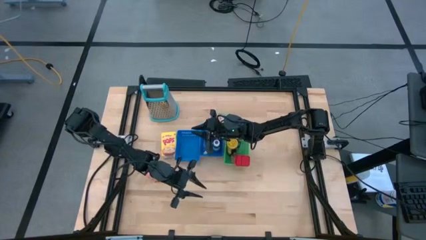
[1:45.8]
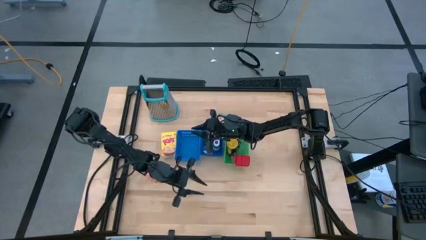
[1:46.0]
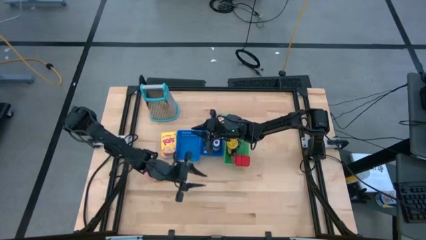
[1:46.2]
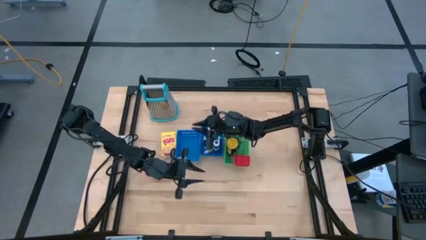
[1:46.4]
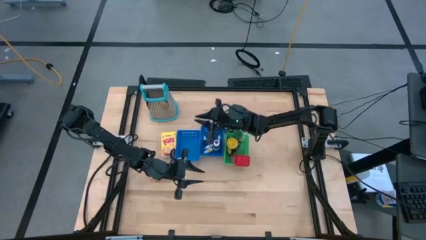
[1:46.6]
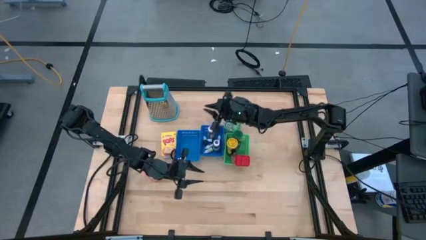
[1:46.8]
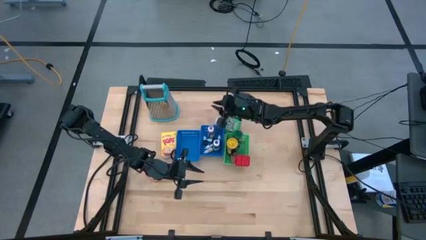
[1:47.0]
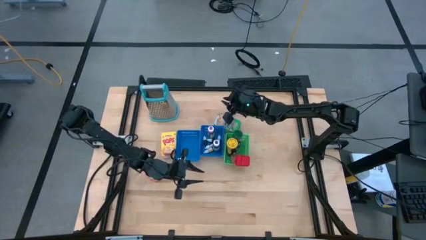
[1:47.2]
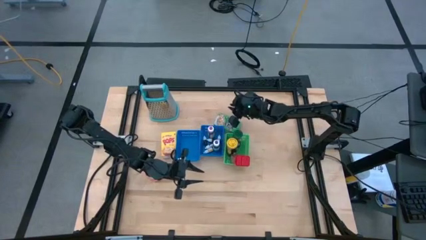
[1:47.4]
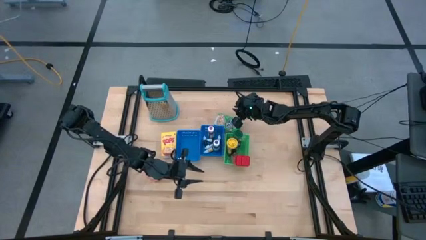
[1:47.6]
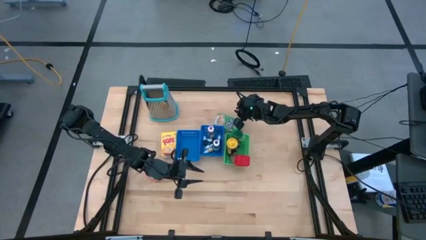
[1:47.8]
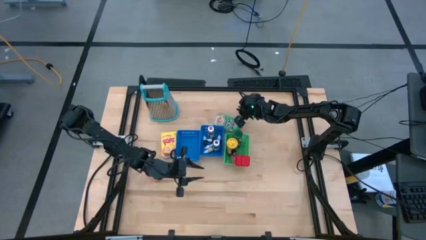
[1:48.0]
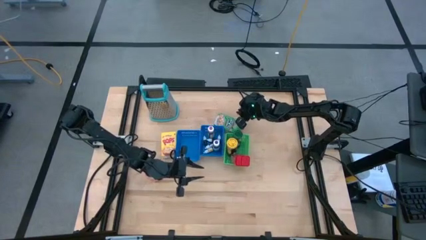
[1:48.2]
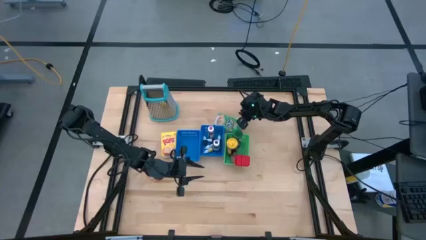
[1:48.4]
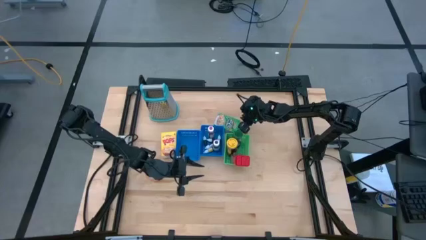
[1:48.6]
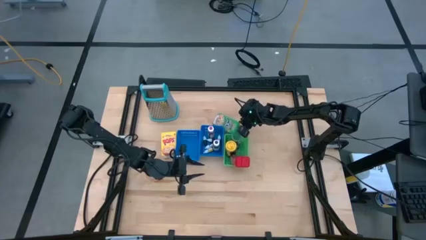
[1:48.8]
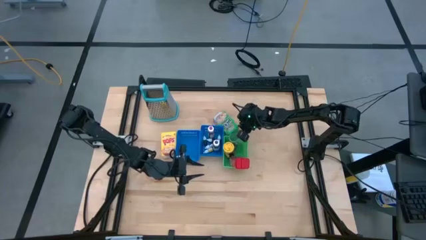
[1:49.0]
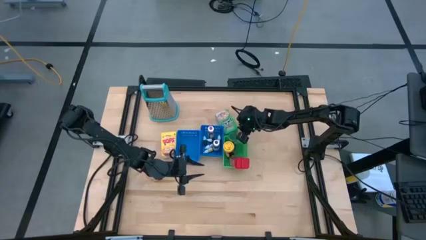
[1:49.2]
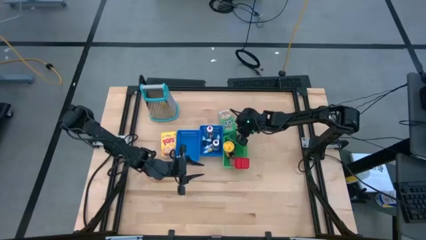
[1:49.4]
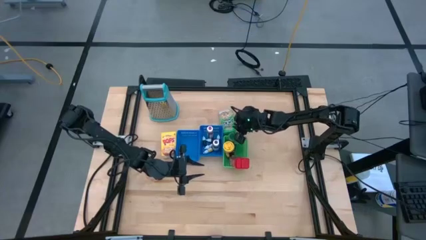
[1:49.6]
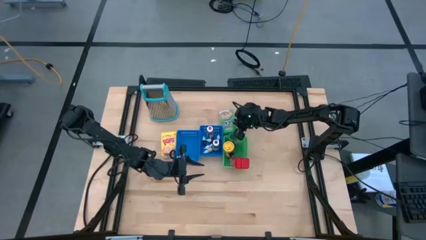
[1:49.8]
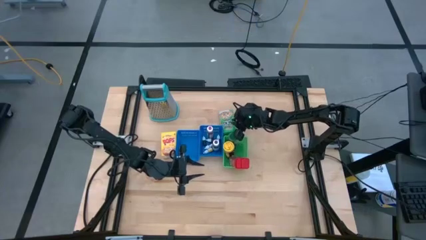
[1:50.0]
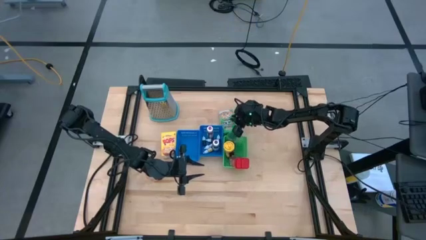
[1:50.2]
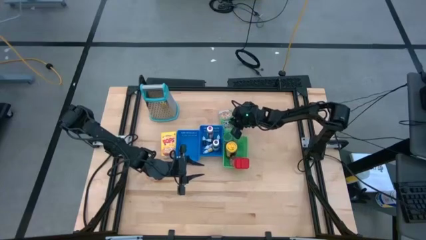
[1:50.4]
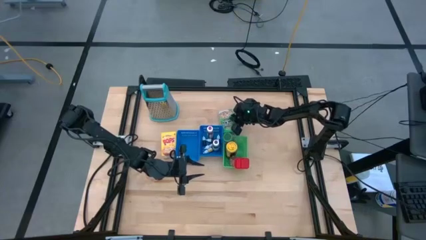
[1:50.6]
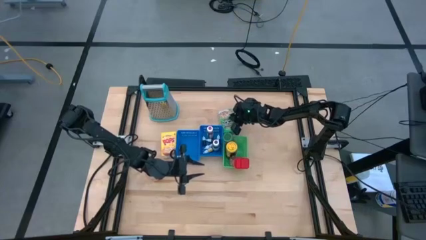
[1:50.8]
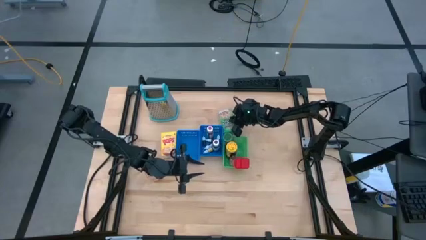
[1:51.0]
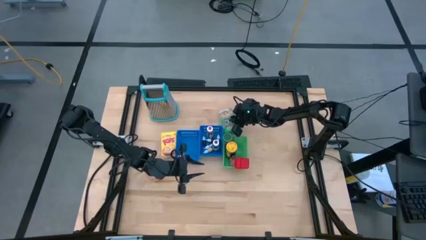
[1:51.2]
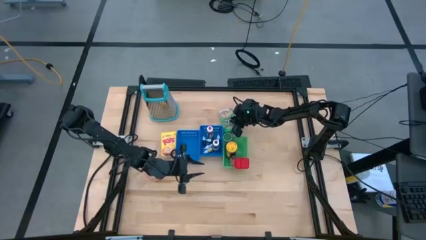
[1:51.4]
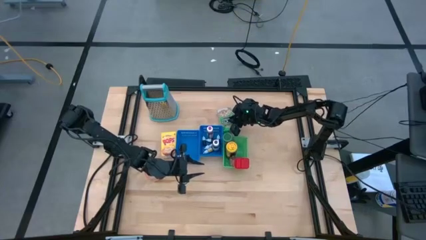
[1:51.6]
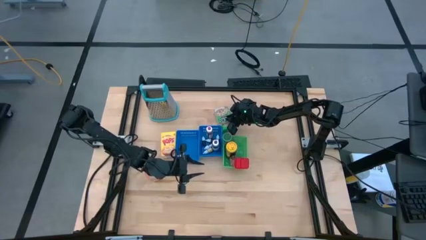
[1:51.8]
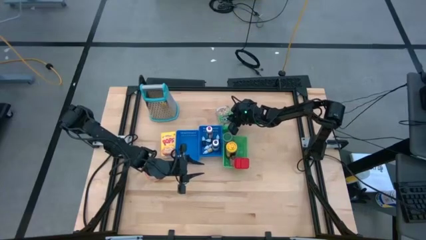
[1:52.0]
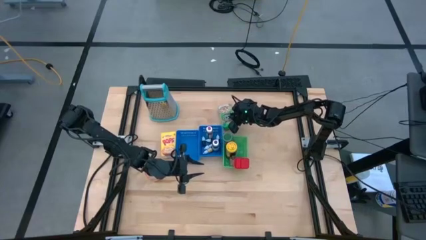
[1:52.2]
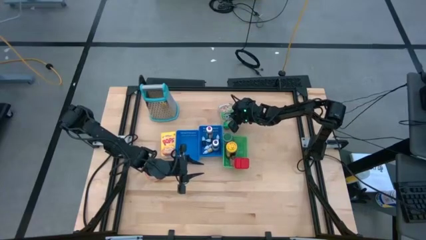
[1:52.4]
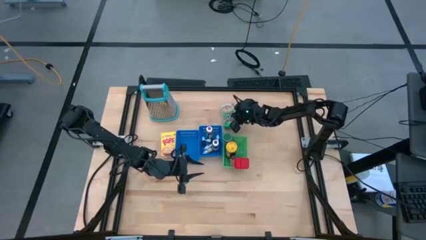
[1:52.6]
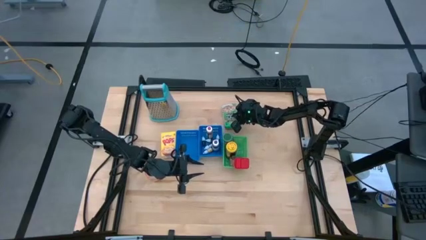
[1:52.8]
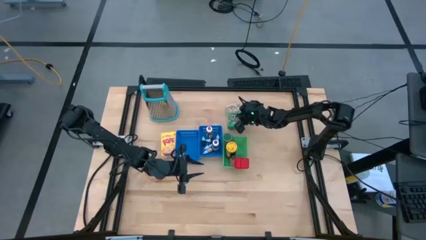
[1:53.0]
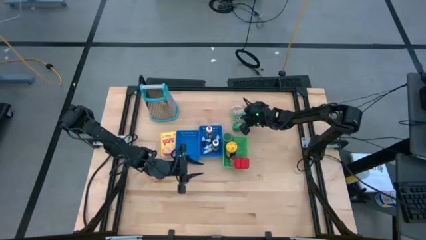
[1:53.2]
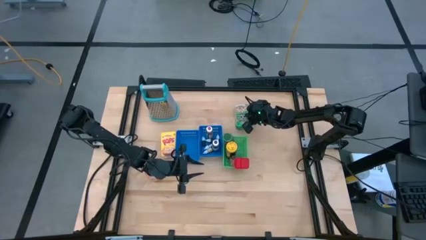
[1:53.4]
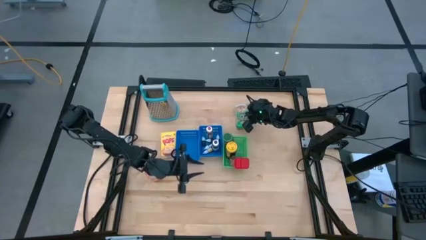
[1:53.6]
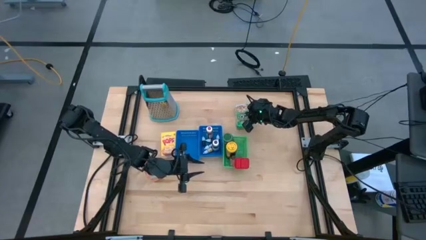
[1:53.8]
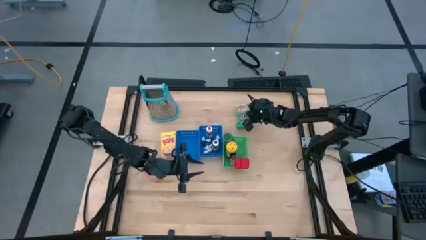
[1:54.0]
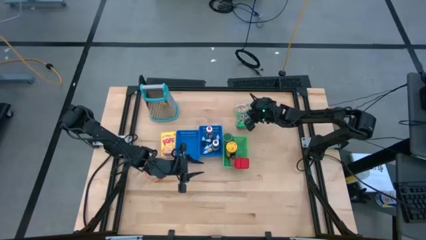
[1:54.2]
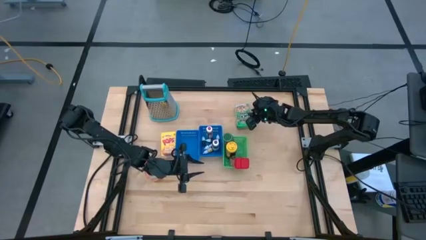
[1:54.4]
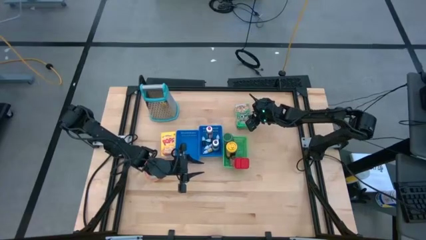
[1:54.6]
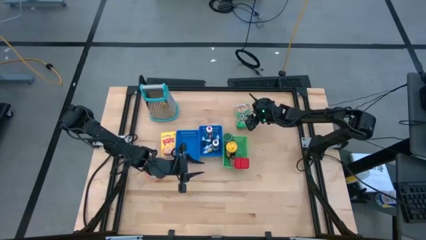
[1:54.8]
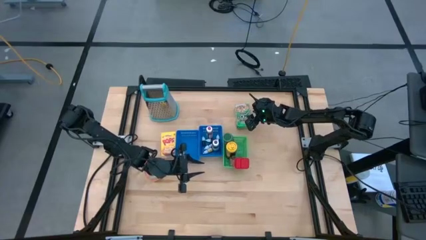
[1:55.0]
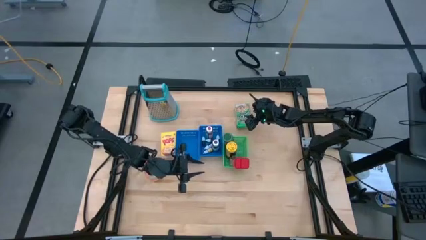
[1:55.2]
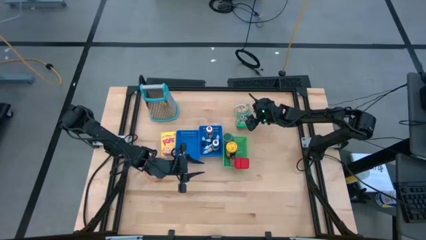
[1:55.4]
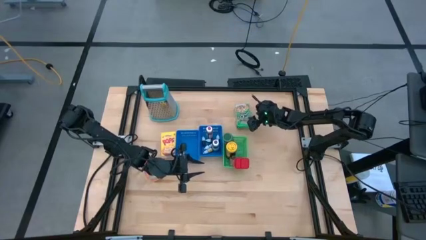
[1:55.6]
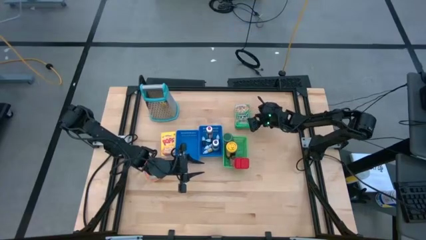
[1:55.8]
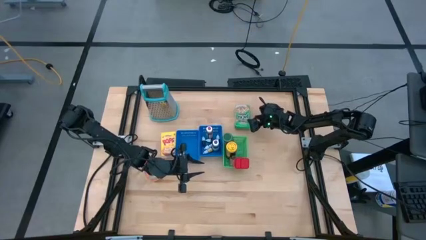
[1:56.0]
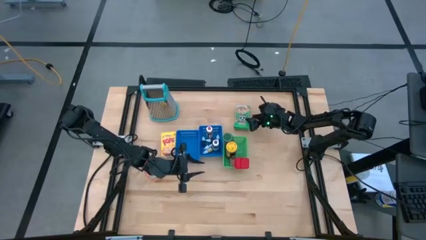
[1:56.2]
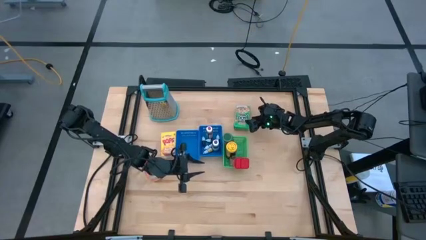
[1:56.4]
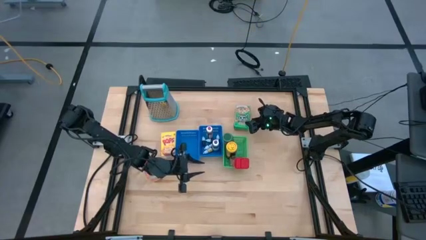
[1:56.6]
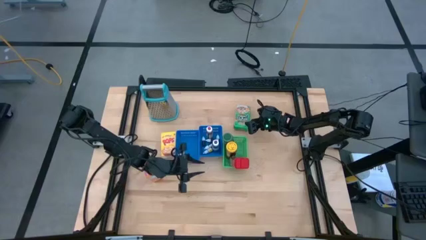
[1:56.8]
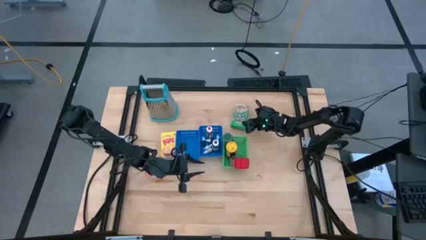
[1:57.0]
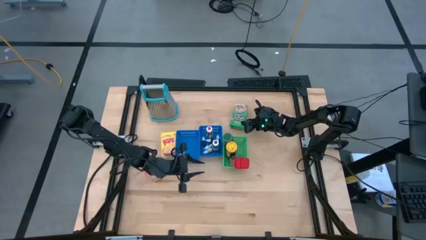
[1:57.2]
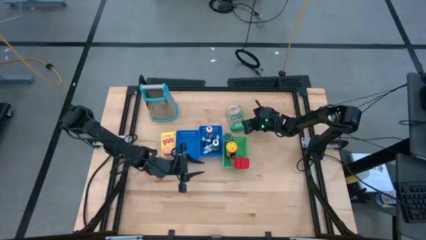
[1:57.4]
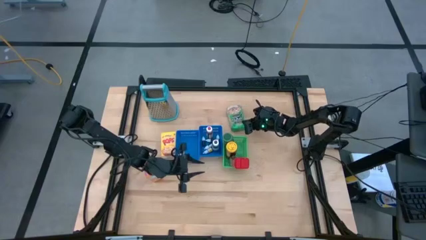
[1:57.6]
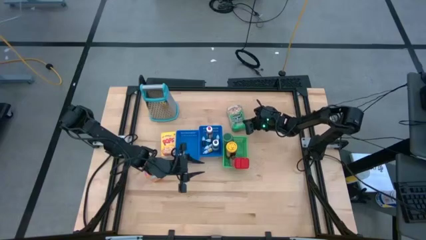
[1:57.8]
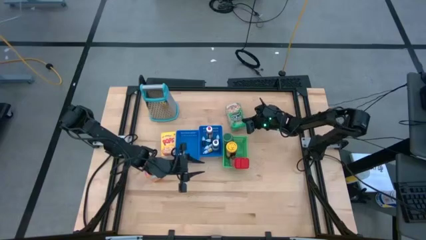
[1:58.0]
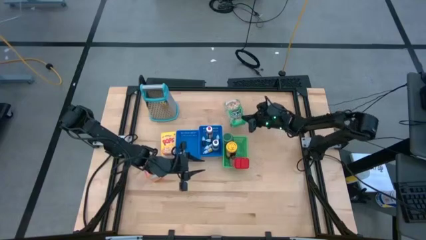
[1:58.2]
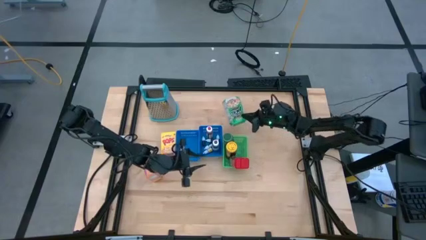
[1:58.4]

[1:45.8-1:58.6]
Task: Pick & Place Kitchen Items
Put the green cereal box into the left blue bin
